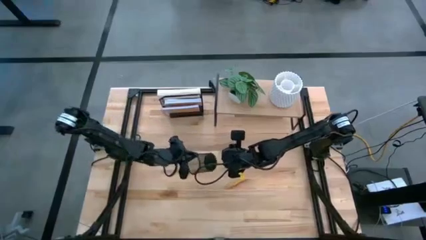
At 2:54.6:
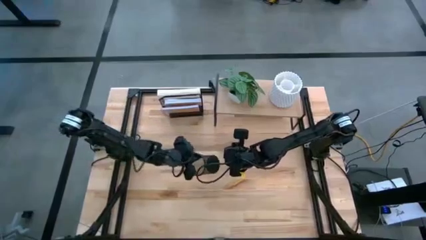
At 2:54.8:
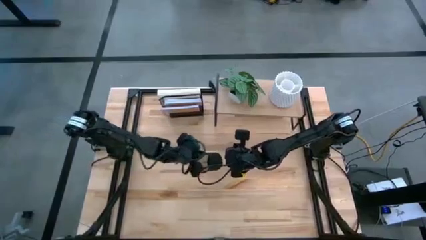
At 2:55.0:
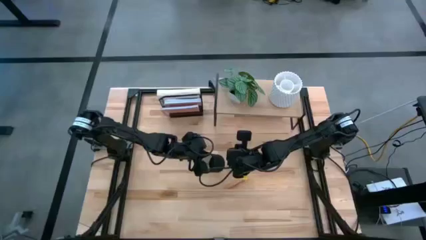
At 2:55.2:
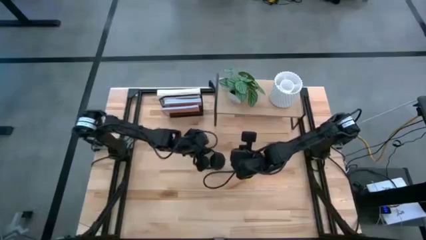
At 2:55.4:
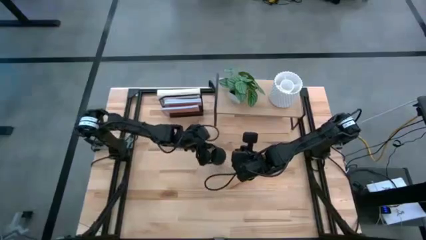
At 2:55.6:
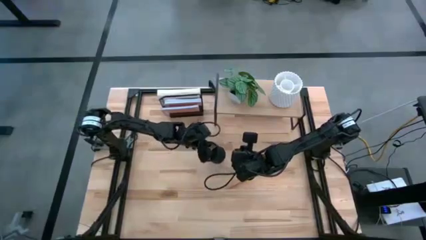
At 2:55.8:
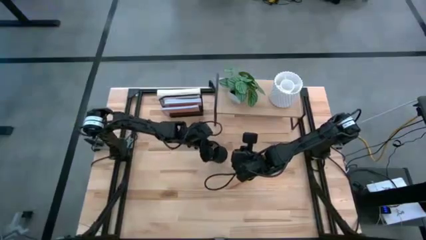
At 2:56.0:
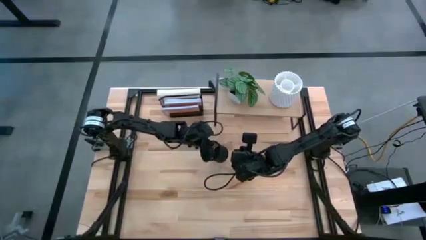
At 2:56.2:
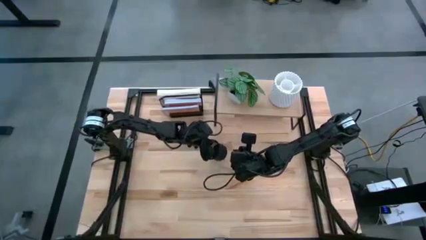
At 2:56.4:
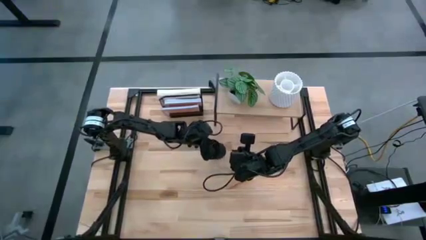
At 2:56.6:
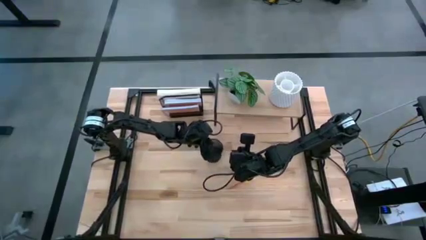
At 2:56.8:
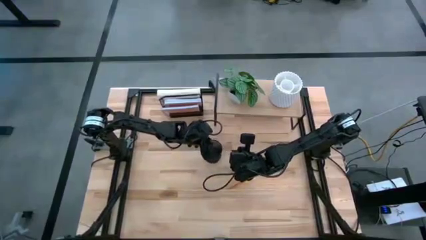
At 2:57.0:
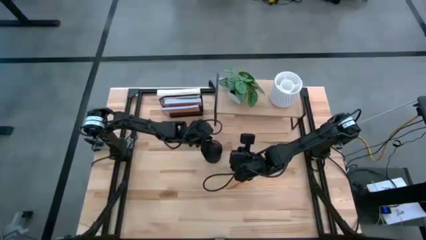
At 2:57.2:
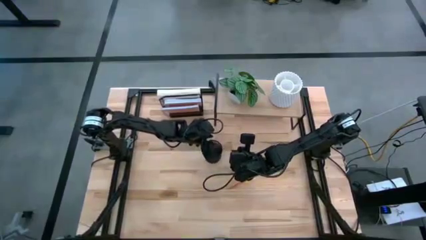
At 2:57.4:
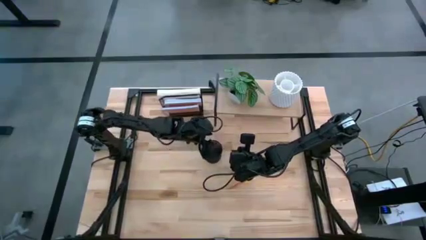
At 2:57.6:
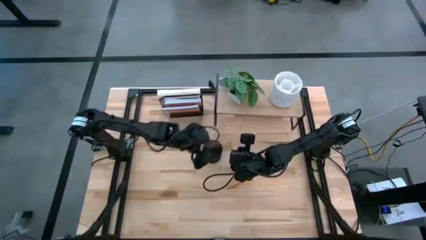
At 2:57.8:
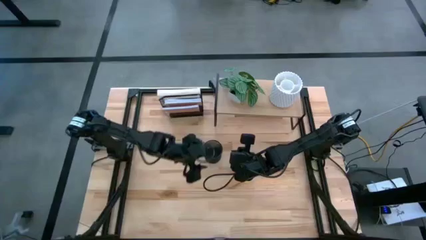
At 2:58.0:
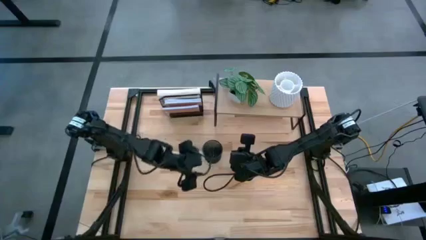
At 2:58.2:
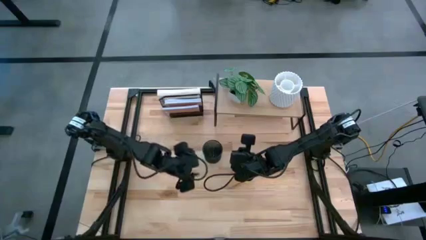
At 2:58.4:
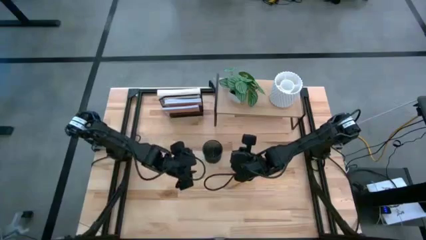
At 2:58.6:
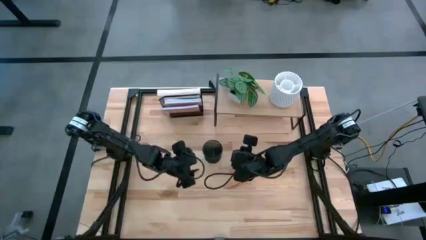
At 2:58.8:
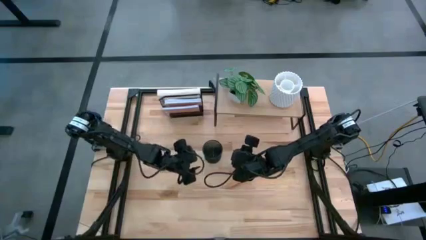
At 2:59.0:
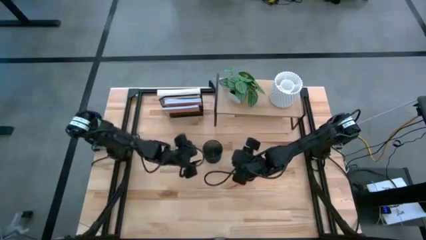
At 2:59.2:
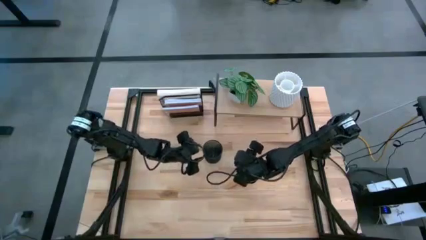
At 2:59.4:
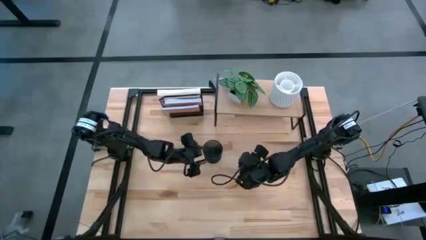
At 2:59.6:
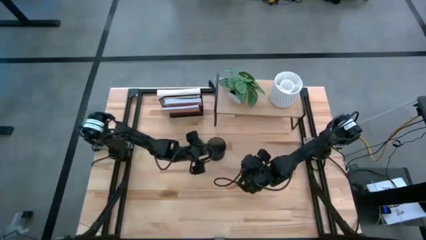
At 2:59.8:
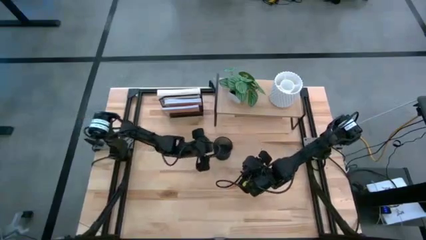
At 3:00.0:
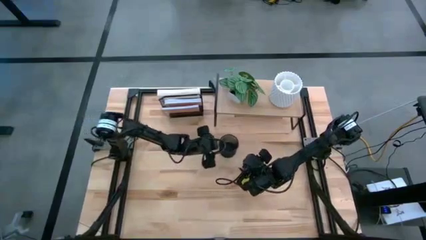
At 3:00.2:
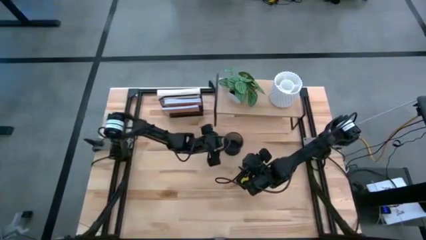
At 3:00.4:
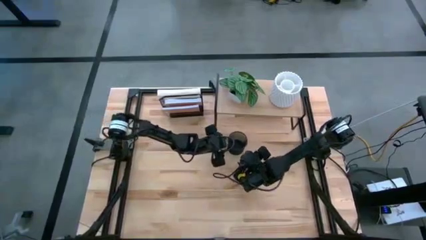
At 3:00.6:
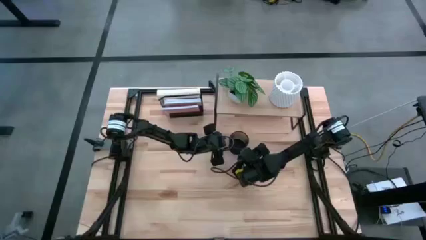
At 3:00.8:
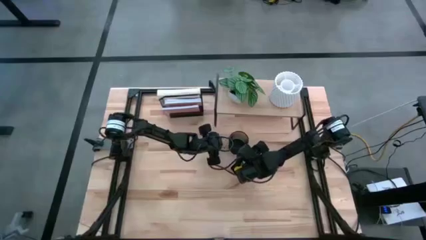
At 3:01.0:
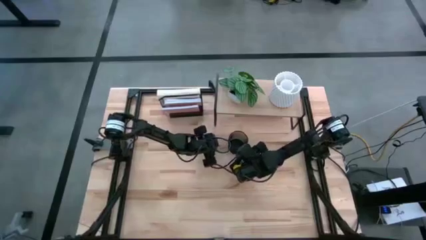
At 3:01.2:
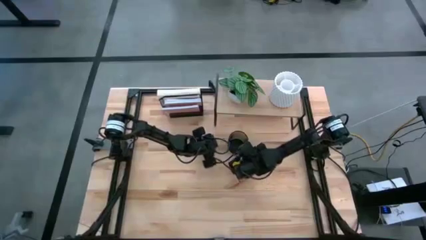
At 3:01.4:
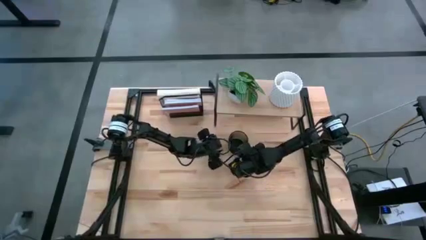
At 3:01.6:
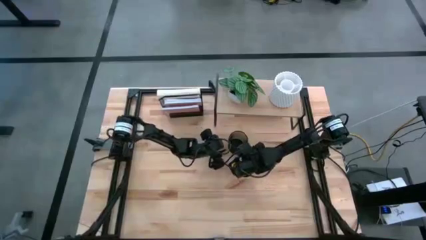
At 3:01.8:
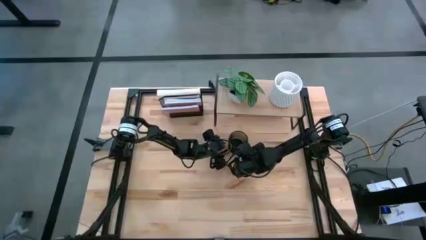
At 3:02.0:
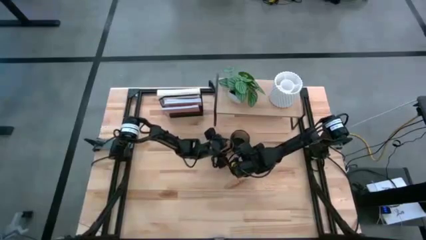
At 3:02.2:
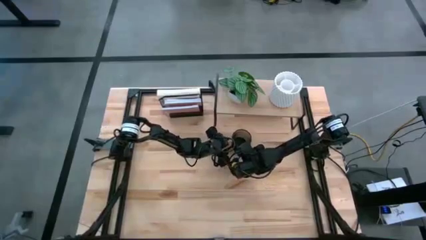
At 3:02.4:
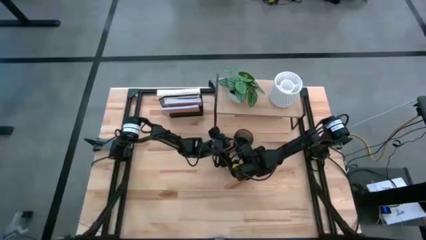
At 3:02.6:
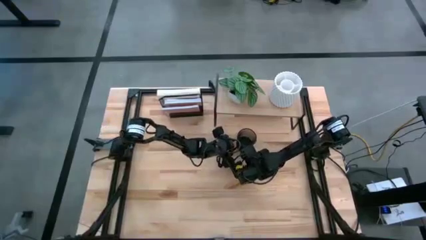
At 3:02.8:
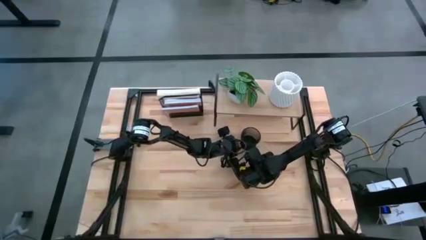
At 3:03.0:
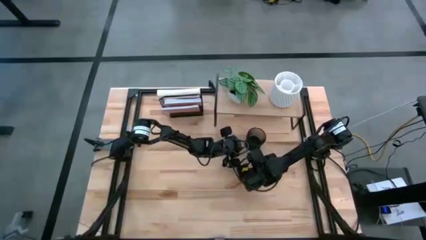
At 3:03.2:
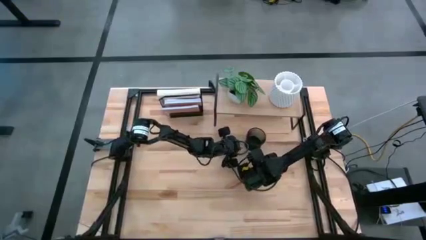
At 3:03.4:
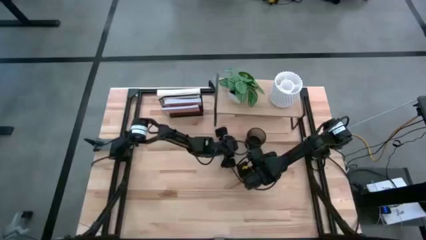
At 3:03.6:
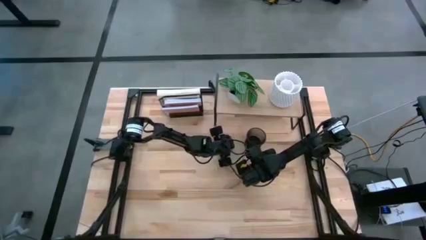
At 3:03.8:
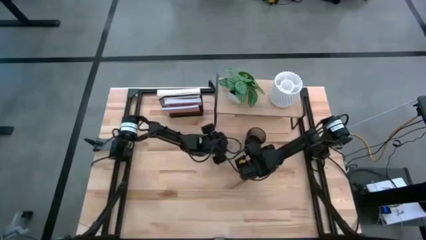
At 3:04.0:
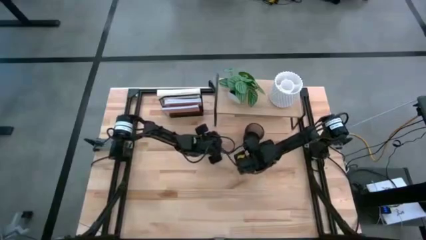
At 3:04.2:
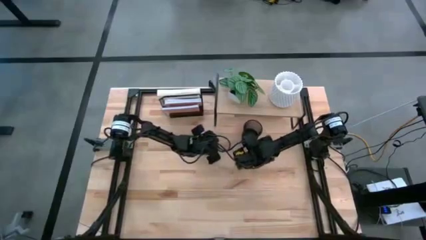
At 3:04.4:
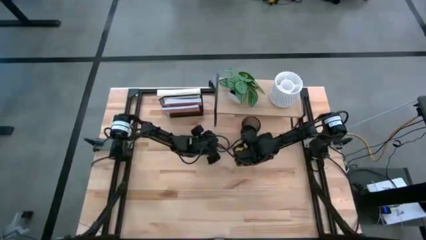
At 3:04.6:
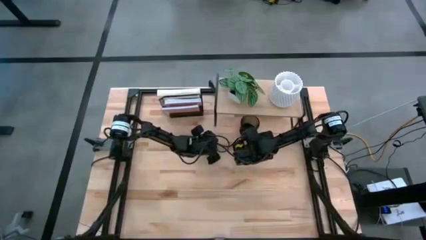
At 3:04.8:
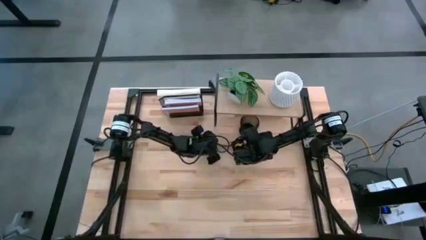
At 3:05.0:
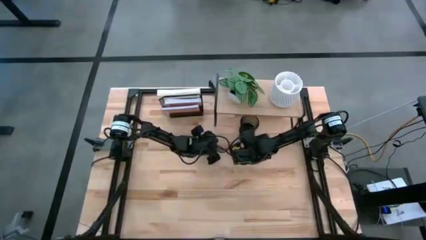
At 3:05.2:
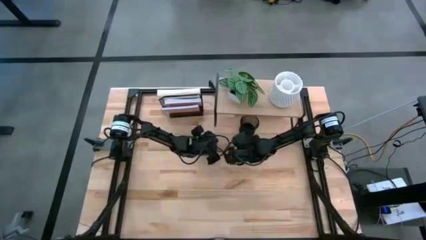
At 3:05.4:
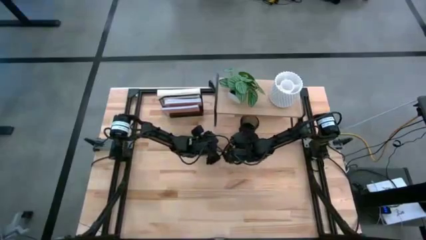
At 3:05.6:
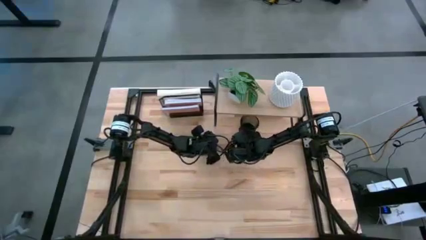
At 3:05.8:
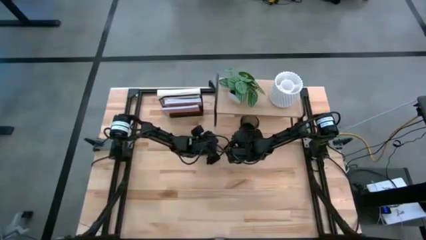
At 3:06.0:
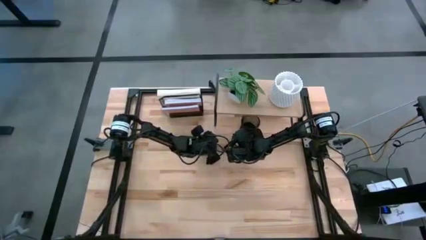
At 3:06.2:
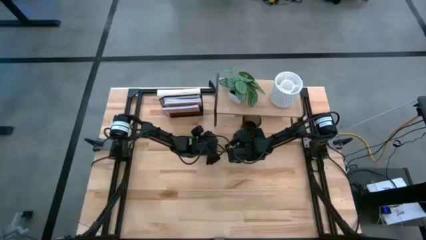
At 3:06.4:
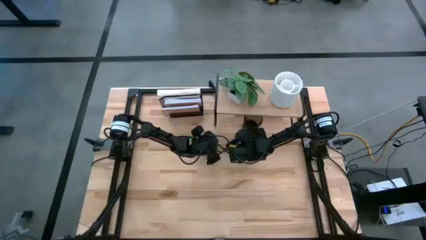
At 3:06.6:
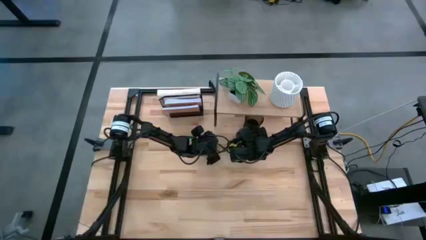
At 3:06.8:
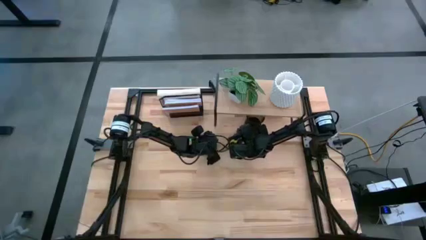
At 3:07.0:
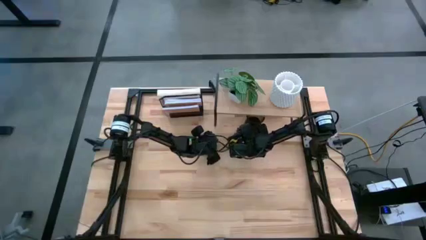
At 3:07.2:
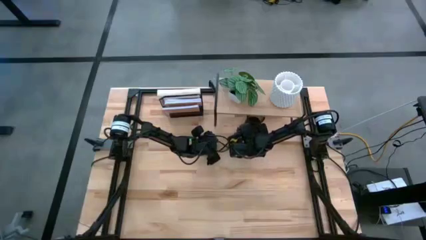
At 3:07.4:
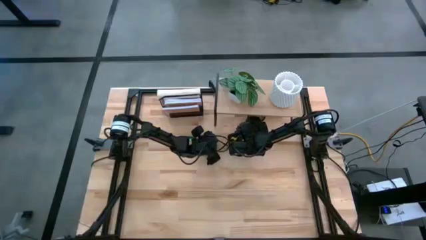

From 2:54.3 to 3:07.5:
Task: Stock shelves
Put the black pen organizer under the shelf
